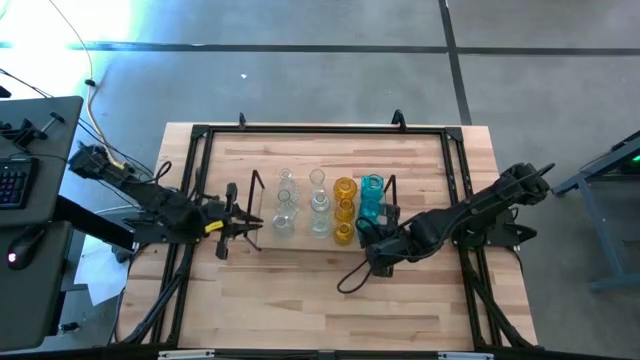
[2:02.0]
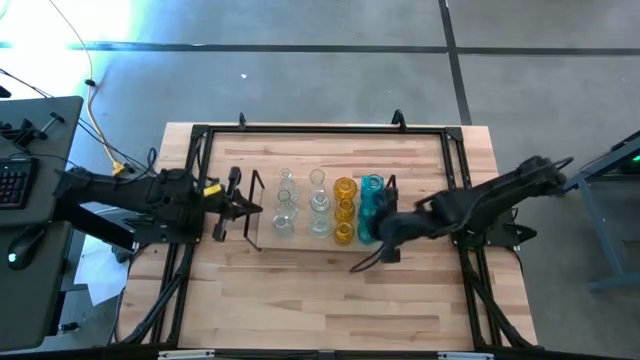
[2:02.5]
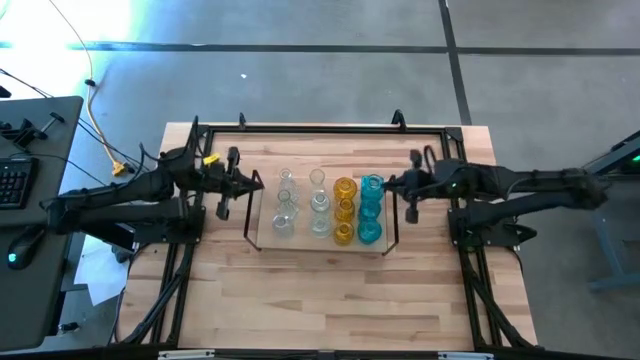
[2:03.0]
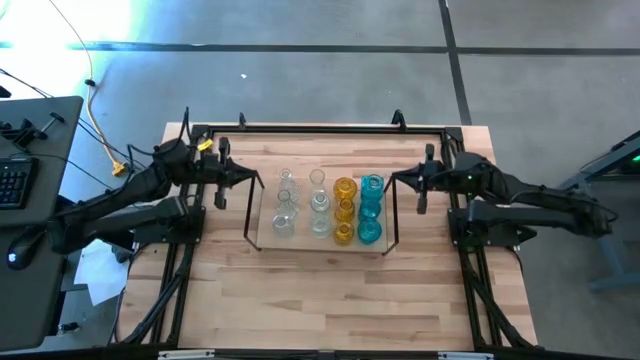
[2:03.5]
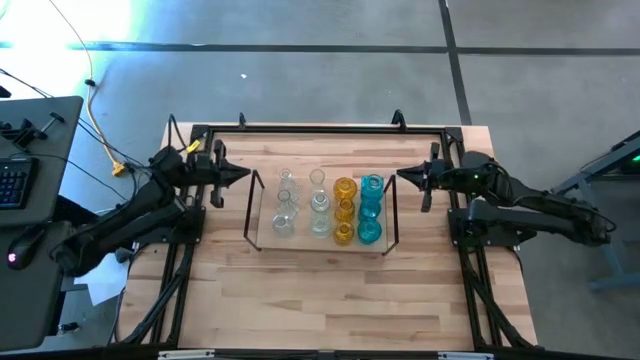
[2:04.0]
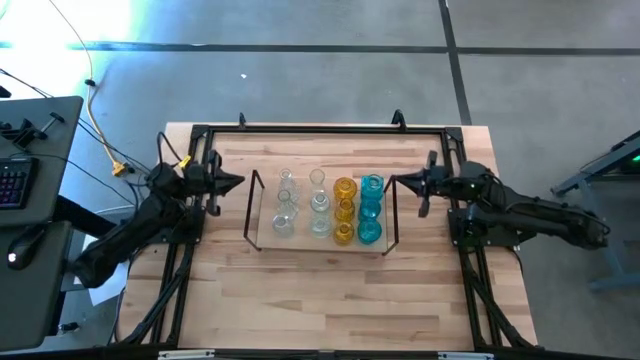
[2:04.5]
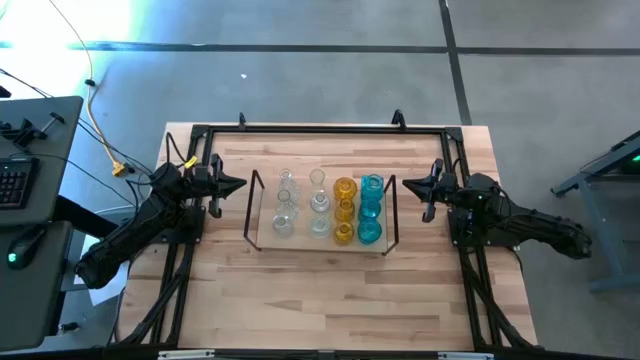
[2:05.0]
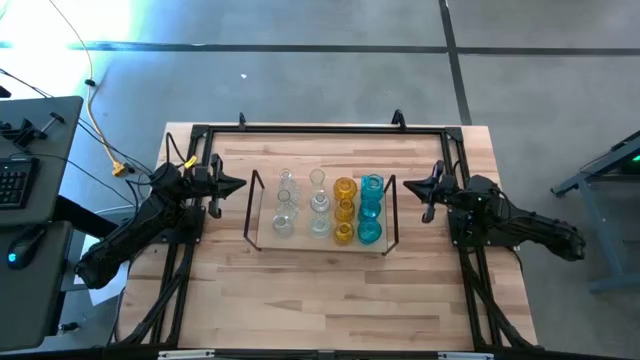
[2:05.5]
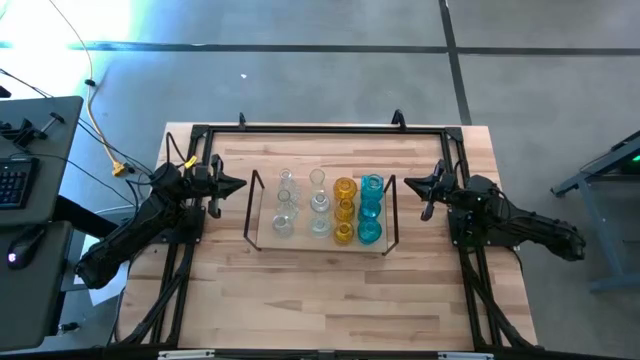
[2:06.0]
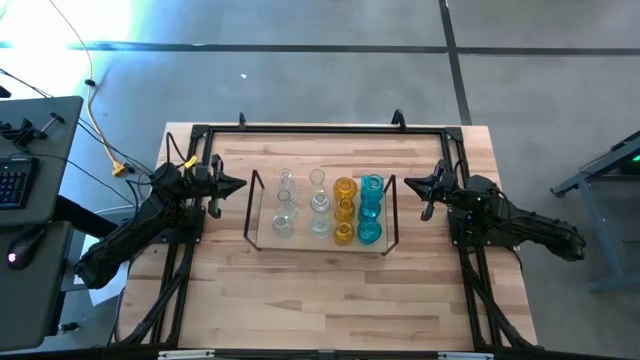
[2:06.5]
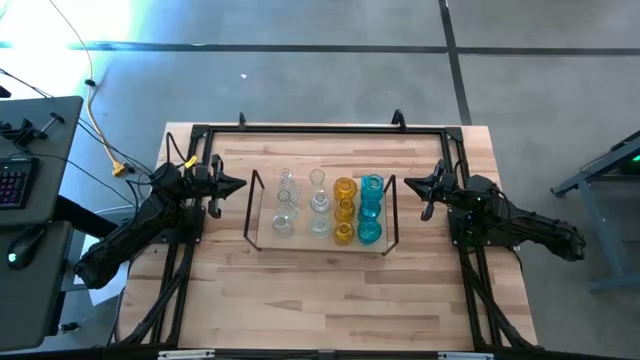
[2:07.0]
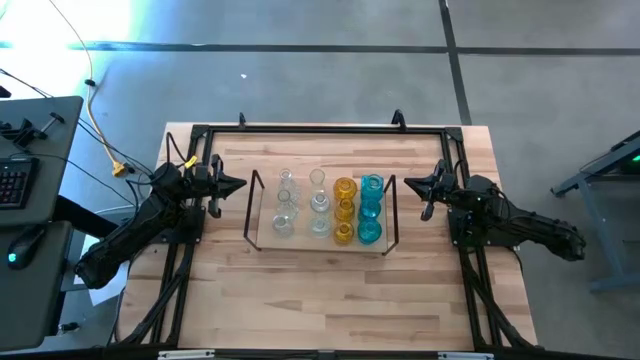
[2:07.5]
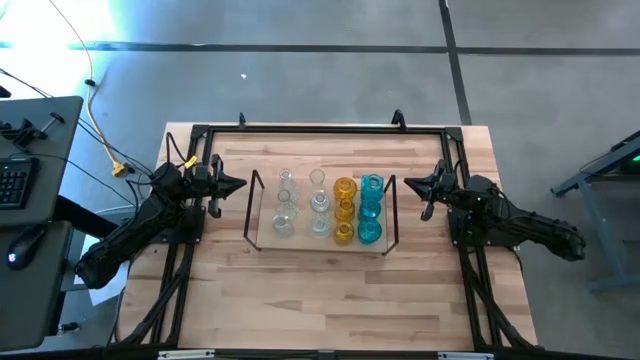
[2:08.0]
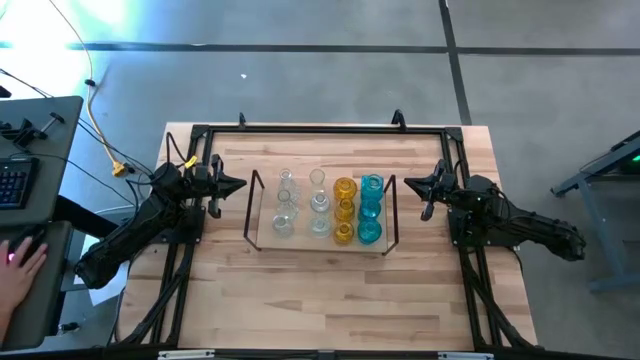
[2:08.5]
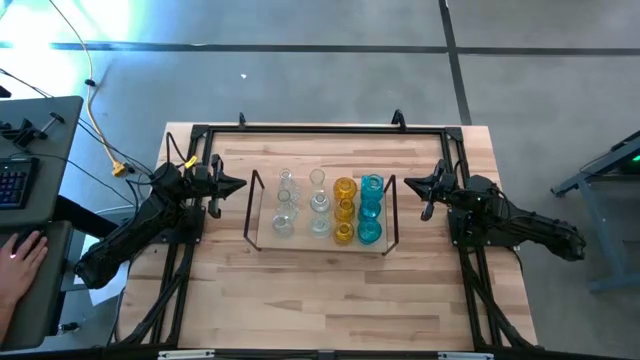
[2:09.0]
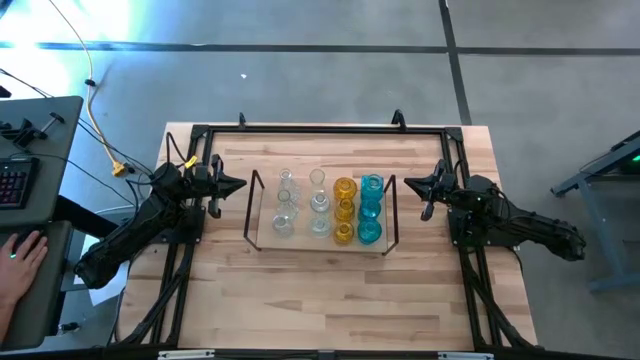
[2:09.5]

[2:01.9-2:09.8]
Task: sort vases onto shelf
Return to Home Position

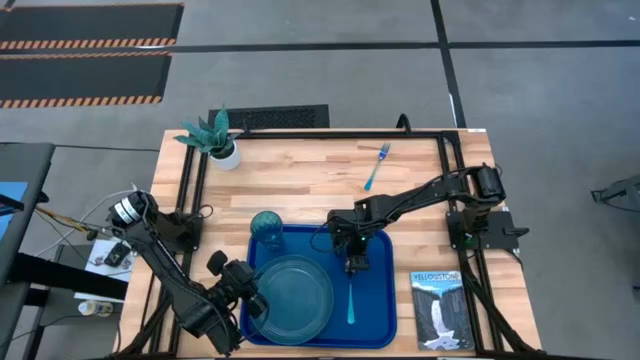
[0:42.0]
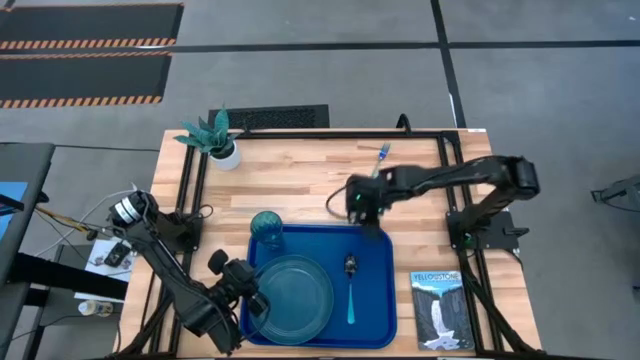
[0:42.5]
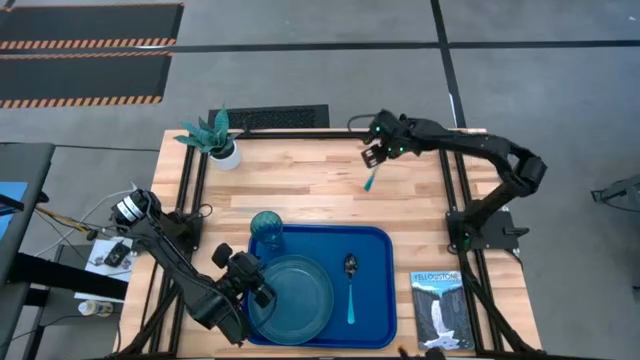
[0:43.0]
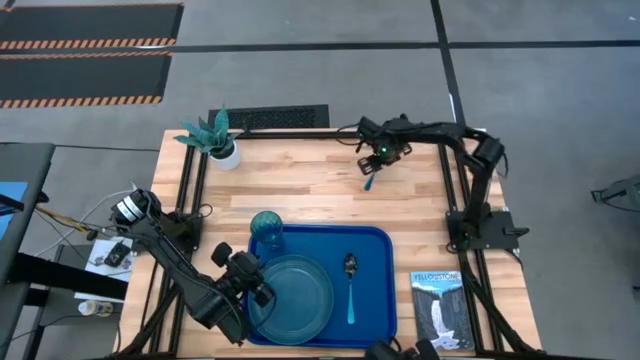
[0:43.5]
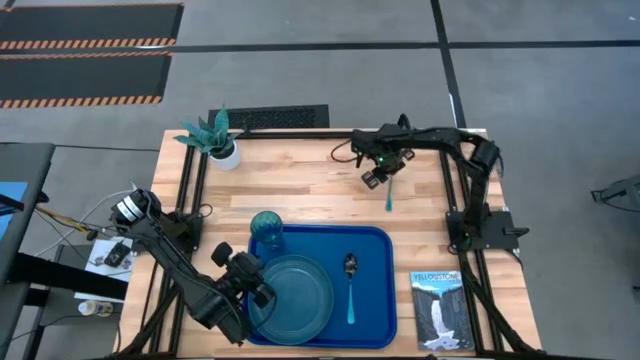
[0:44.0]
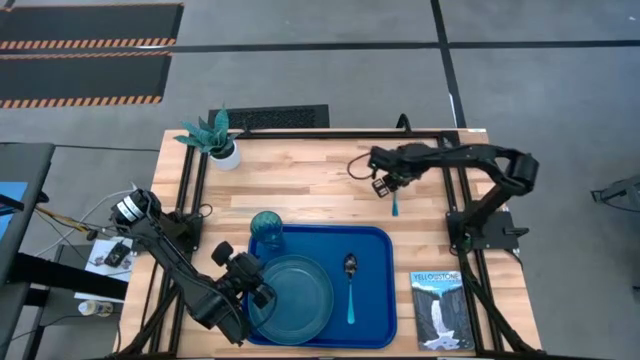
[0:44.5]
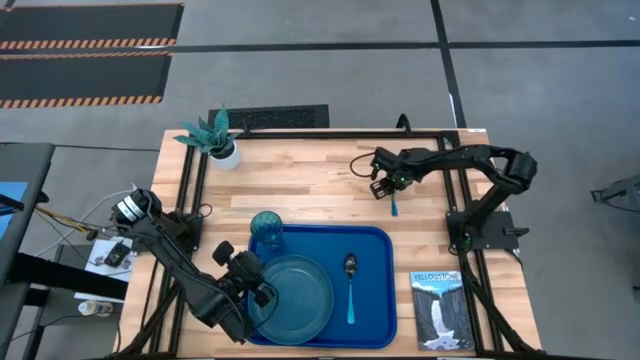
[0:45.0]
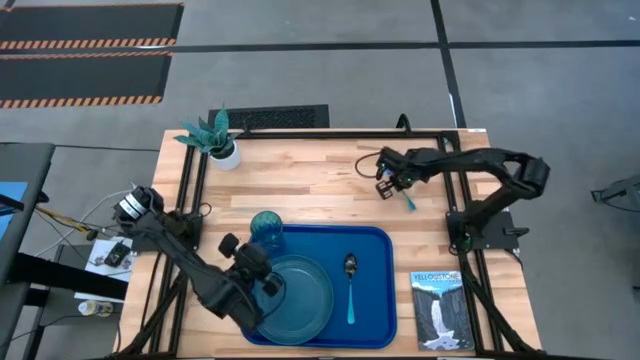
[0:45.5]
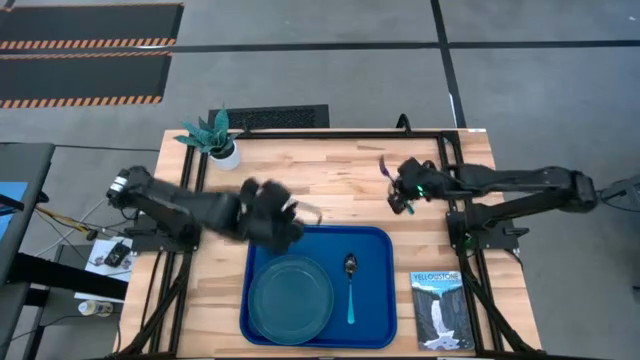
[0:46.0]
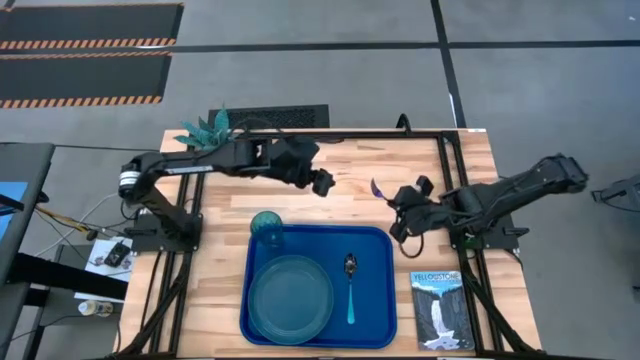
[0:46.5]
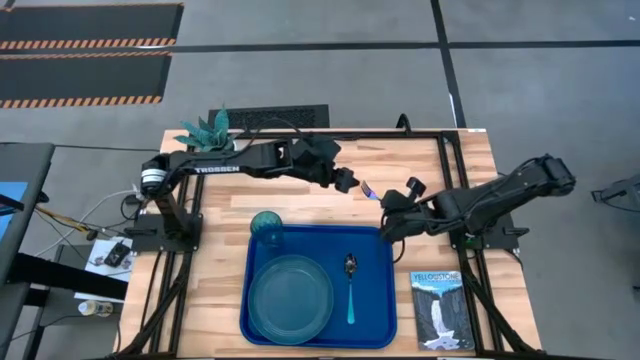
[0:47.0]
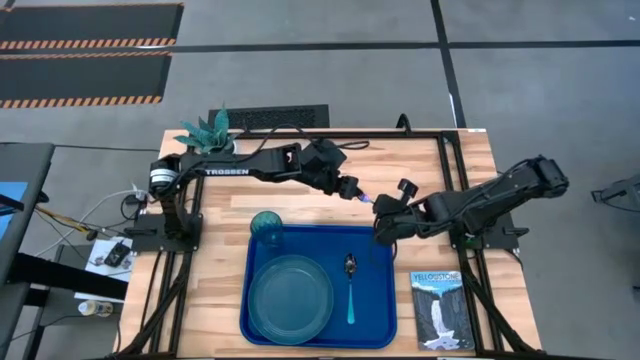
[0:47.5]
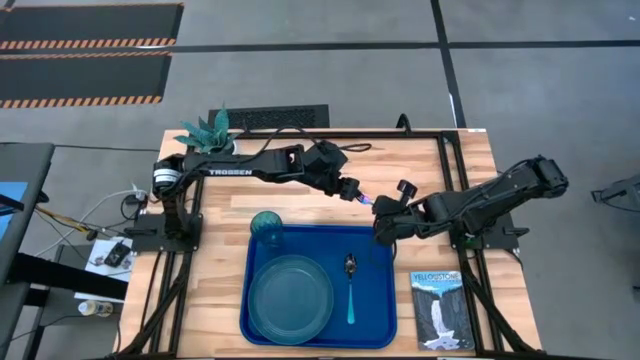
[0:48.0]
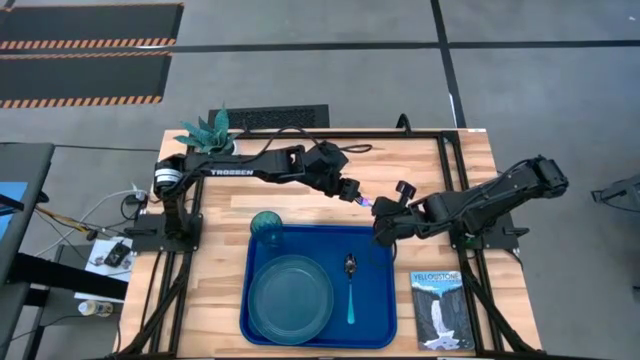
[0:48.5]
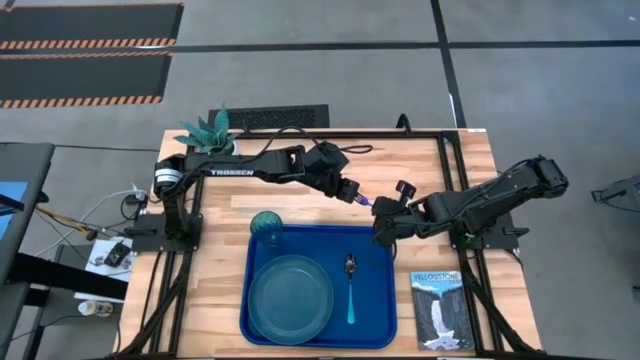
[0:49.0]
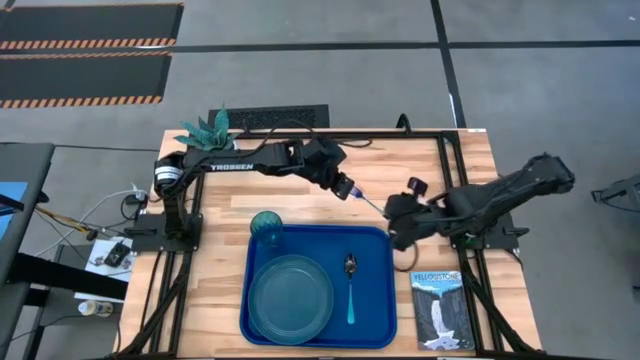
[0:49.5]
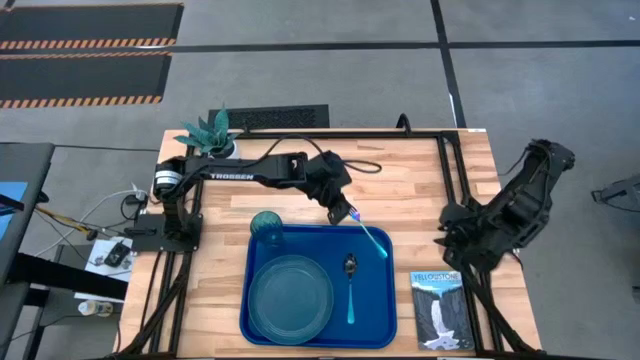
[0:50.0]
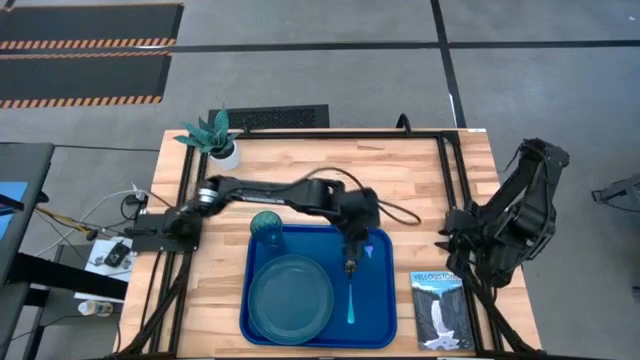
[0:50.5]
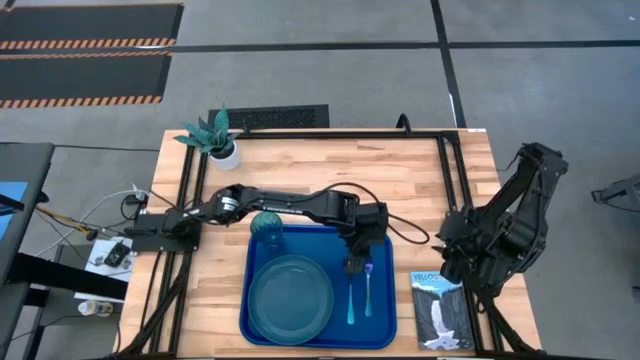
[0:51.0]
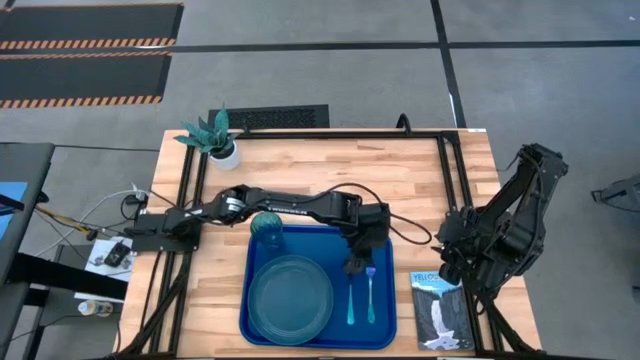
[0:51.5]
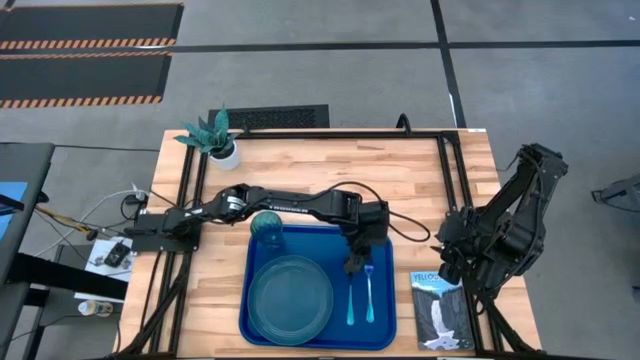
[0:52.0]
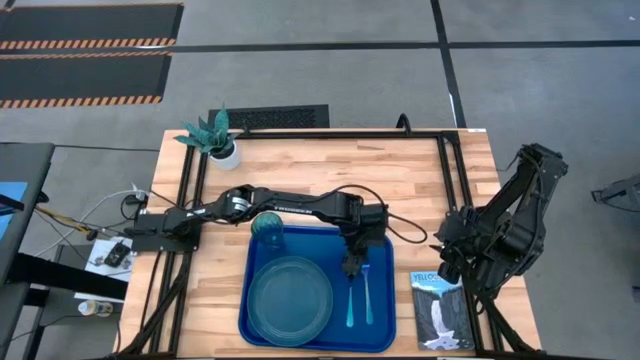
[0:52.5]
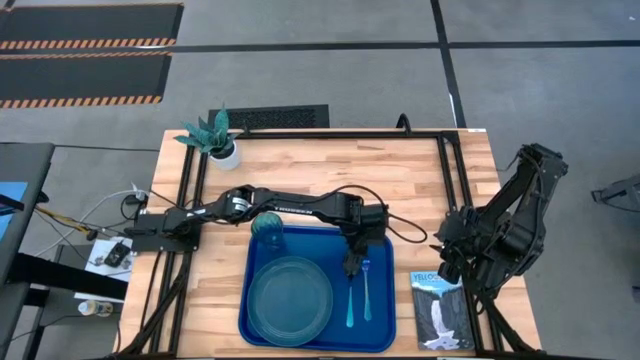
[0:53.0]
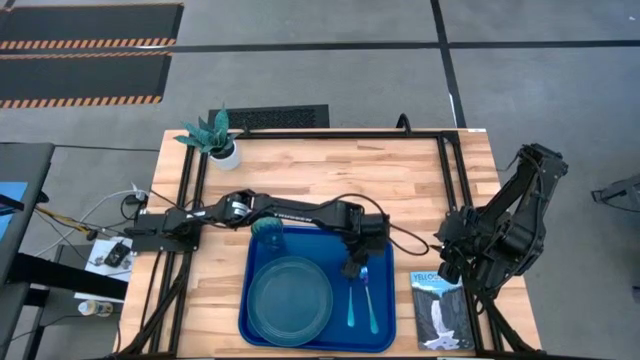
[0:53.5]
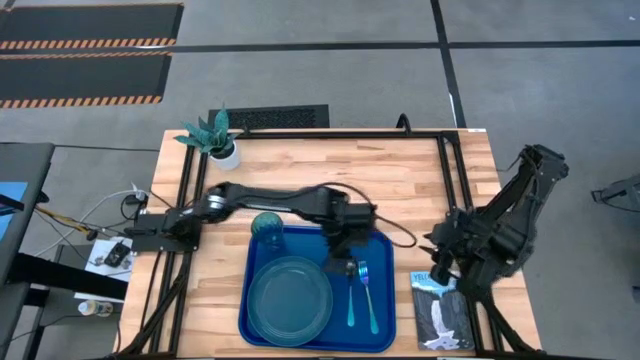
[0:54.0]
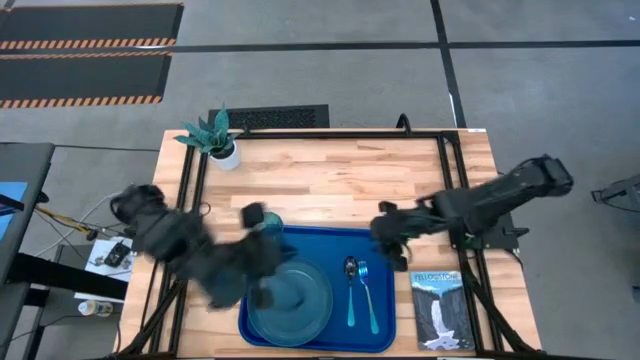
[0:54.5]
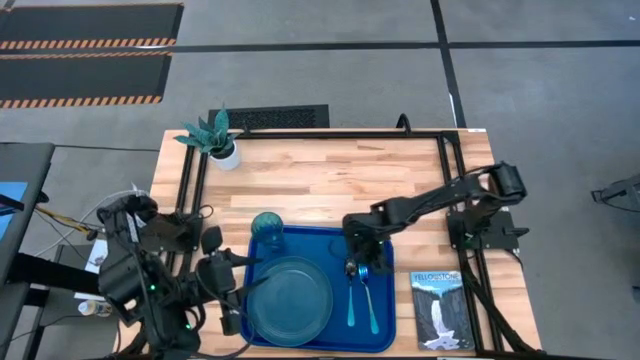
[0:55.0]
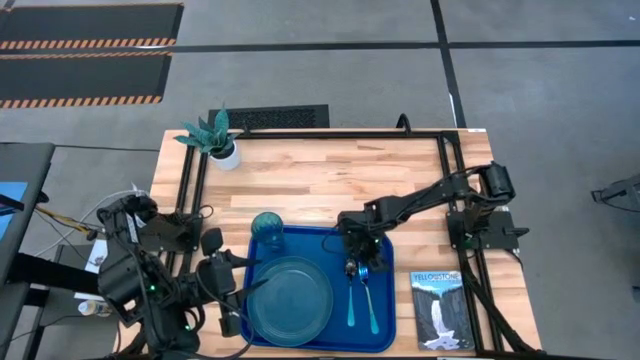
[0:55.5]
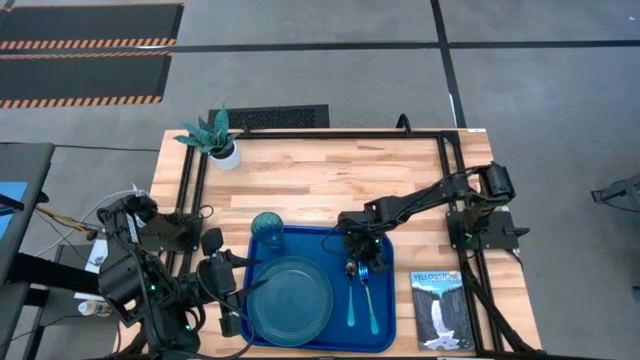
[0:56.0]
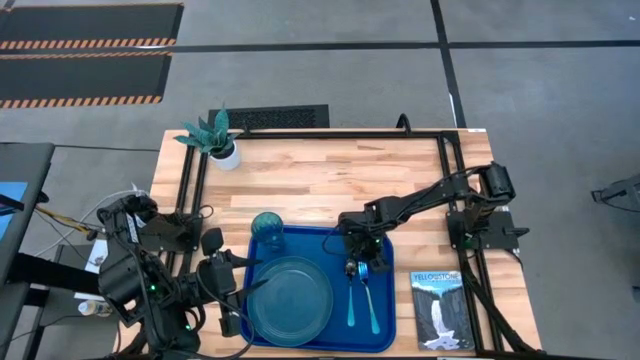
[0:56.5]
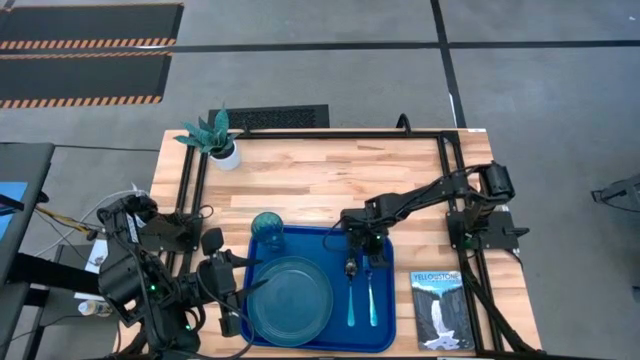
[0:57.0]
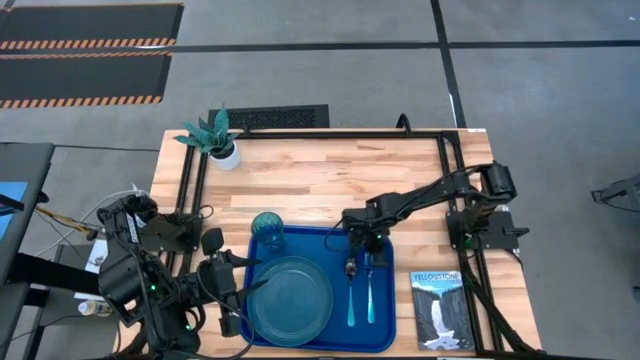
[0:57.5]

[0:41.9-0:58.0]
Task: Pick and place plate/cup/fork/spoon on tray
Put the blue fork on the blue serving tray to the right of the blue spoon
